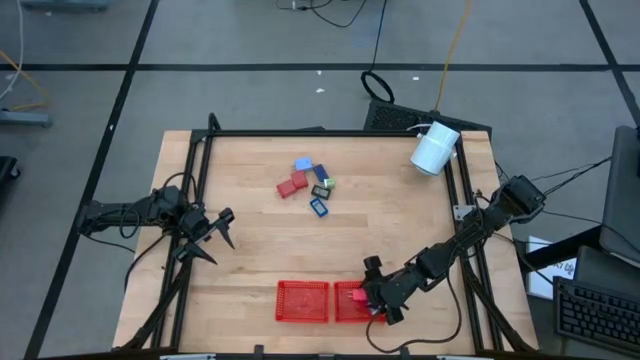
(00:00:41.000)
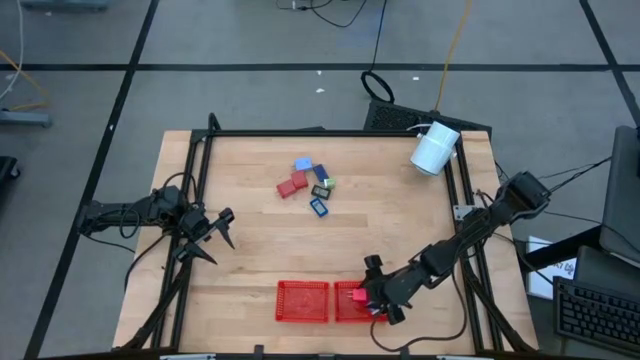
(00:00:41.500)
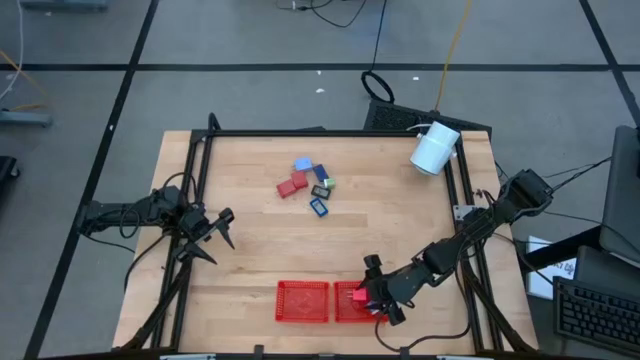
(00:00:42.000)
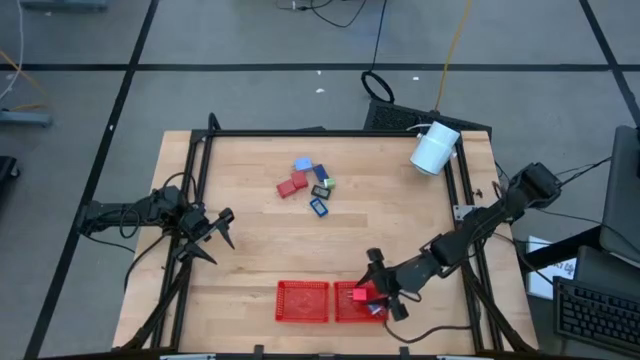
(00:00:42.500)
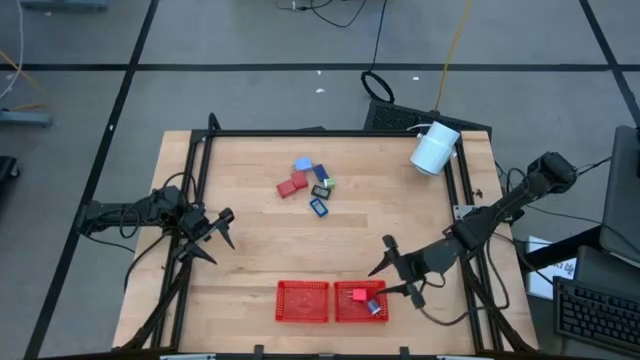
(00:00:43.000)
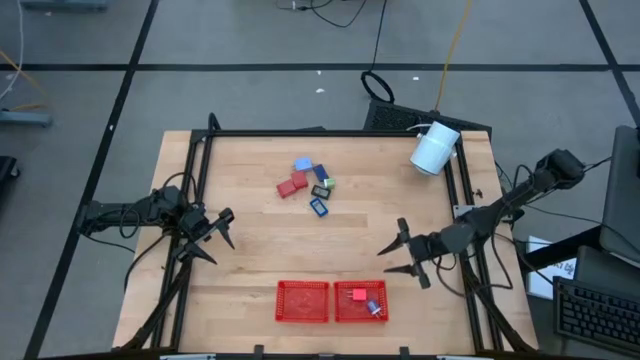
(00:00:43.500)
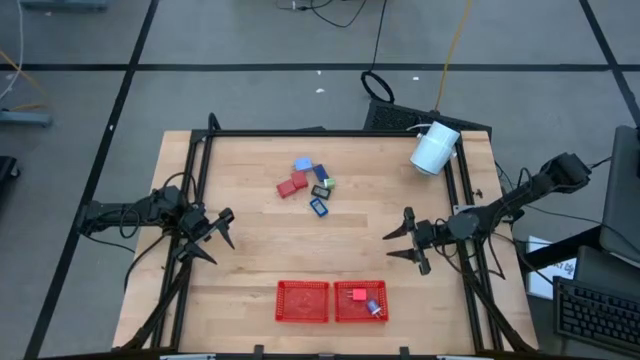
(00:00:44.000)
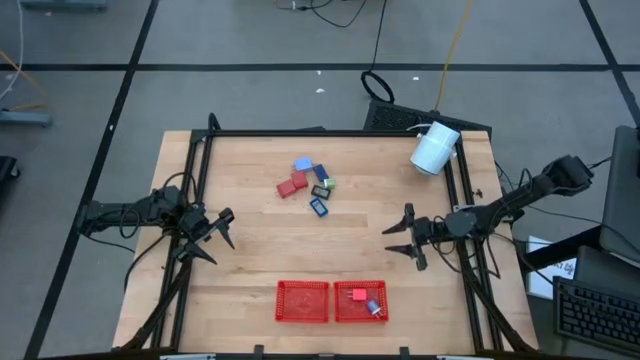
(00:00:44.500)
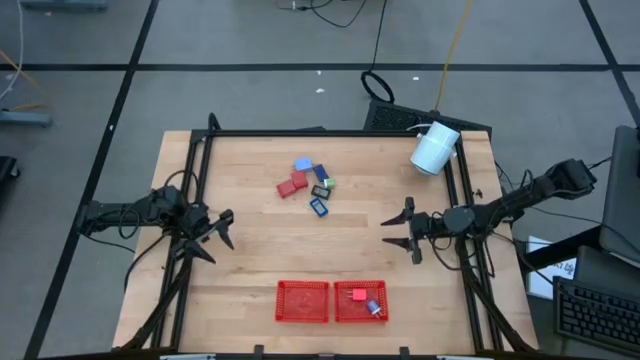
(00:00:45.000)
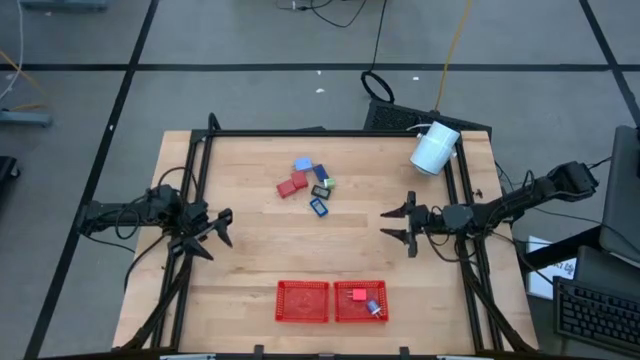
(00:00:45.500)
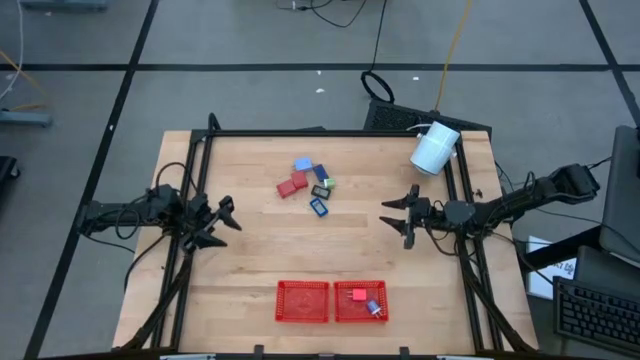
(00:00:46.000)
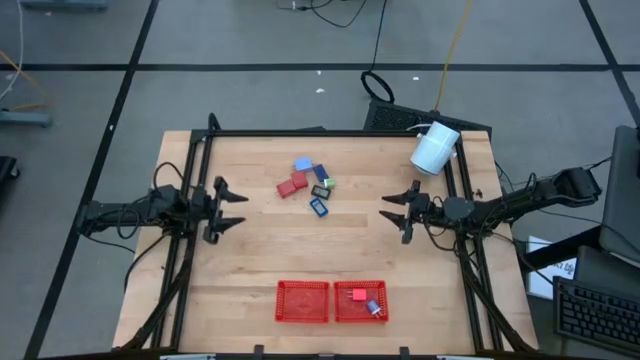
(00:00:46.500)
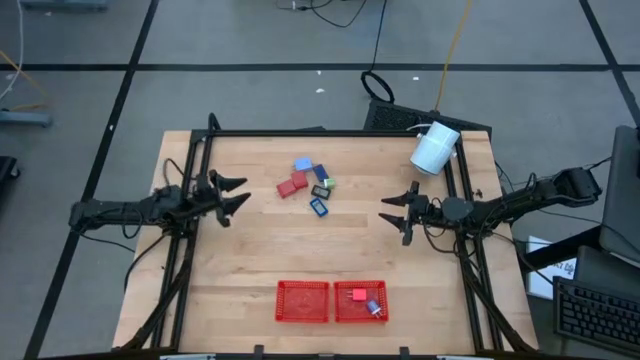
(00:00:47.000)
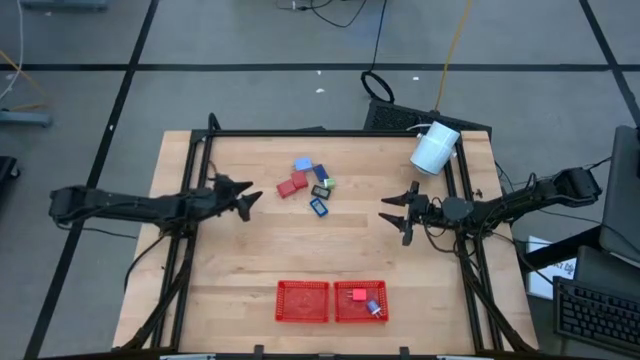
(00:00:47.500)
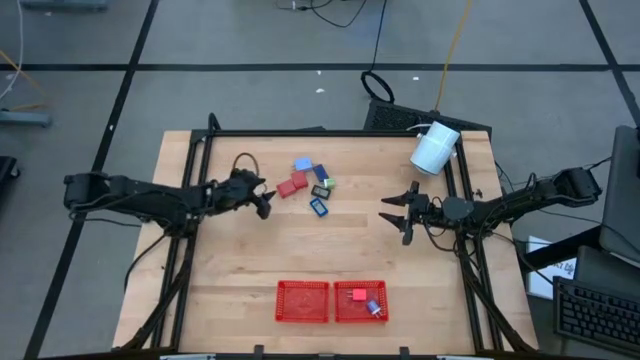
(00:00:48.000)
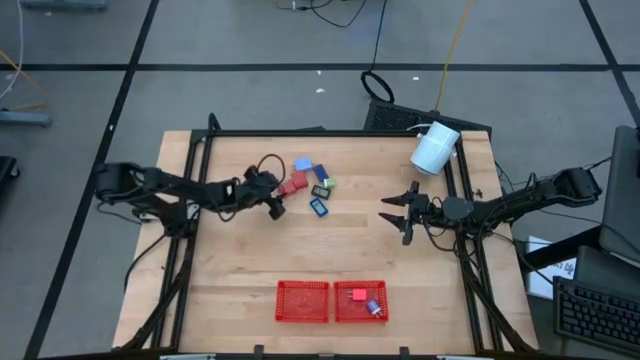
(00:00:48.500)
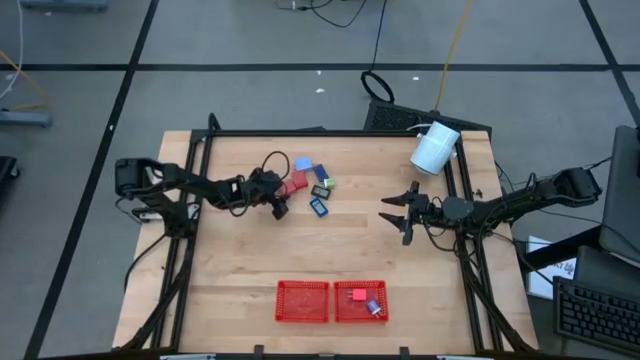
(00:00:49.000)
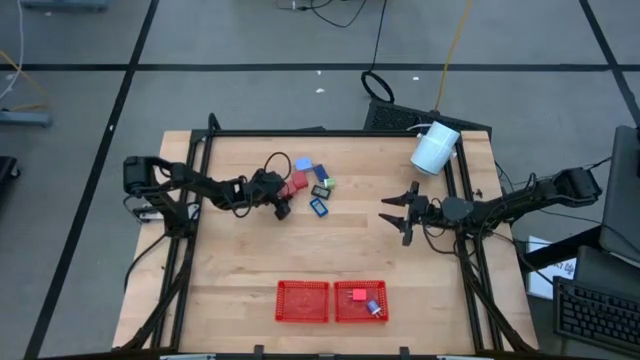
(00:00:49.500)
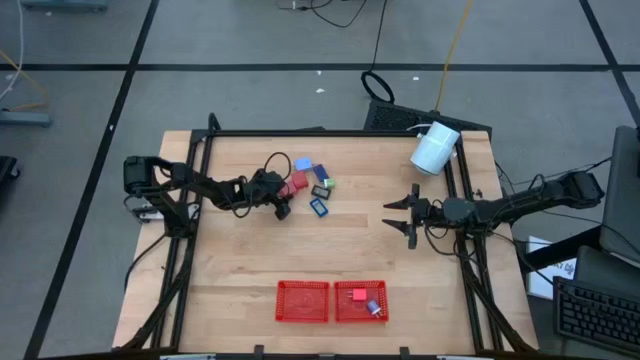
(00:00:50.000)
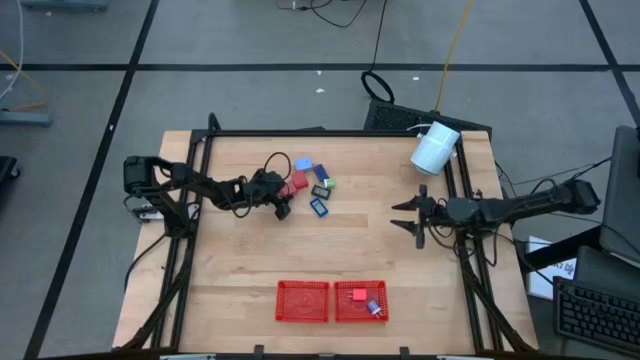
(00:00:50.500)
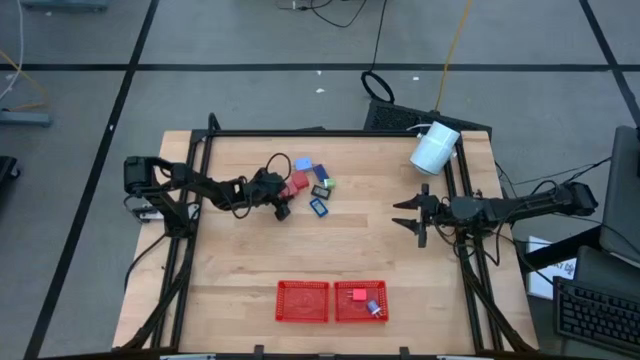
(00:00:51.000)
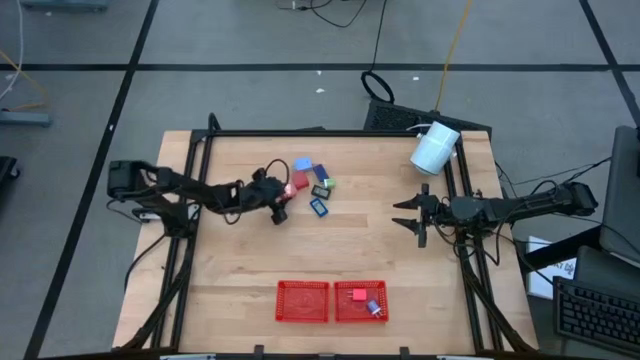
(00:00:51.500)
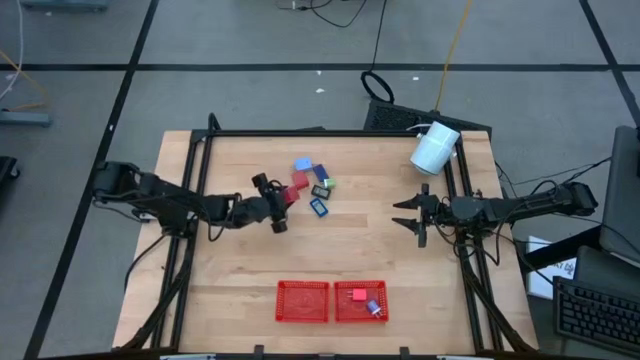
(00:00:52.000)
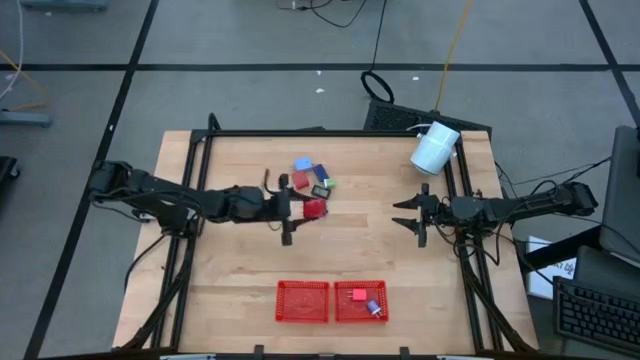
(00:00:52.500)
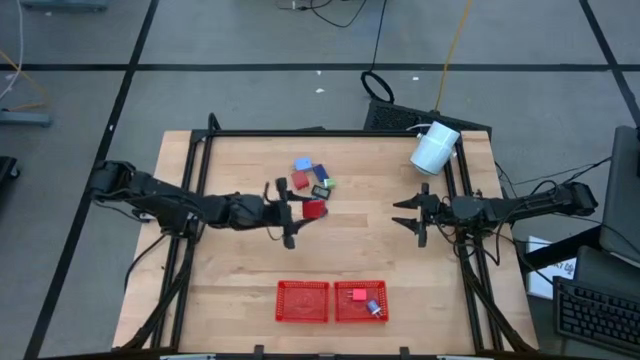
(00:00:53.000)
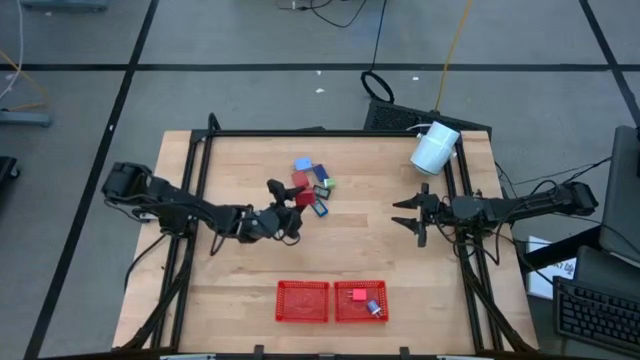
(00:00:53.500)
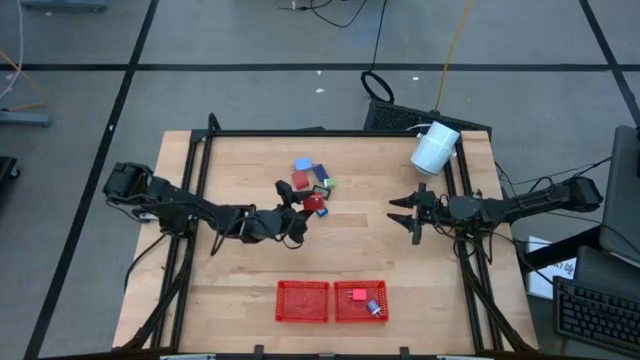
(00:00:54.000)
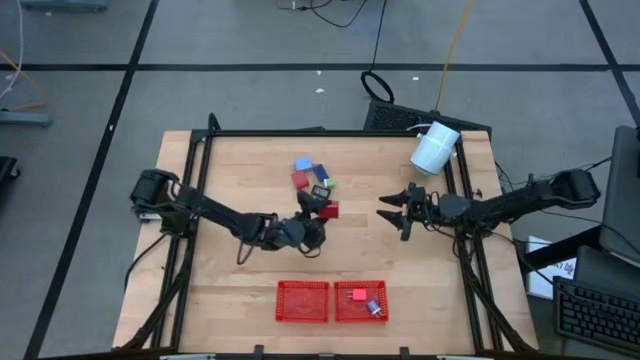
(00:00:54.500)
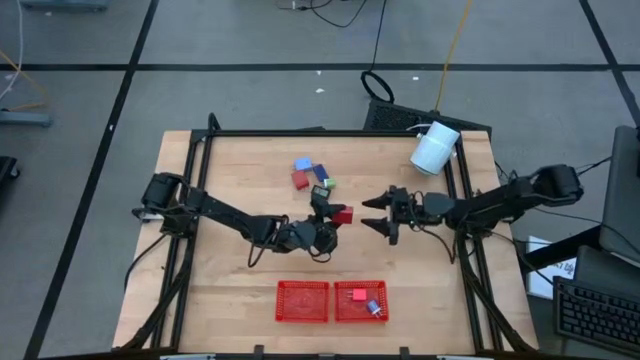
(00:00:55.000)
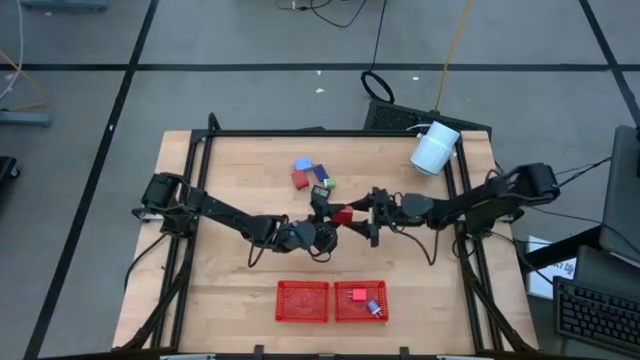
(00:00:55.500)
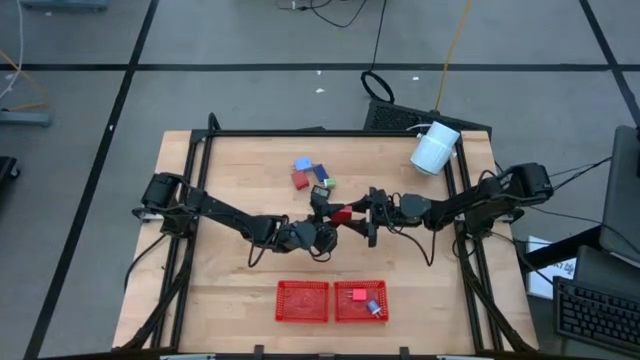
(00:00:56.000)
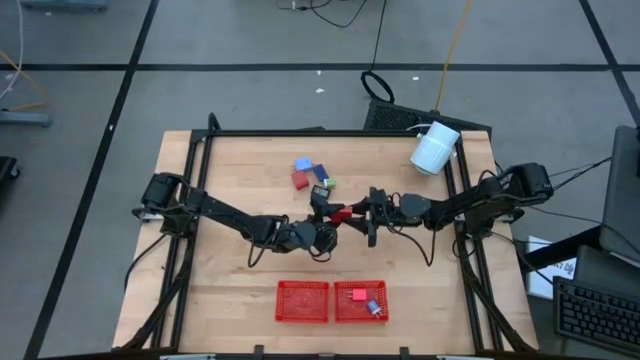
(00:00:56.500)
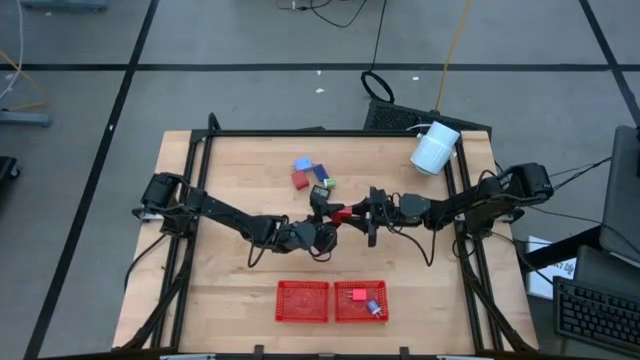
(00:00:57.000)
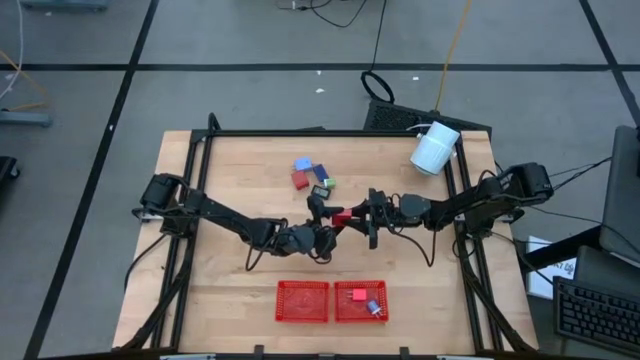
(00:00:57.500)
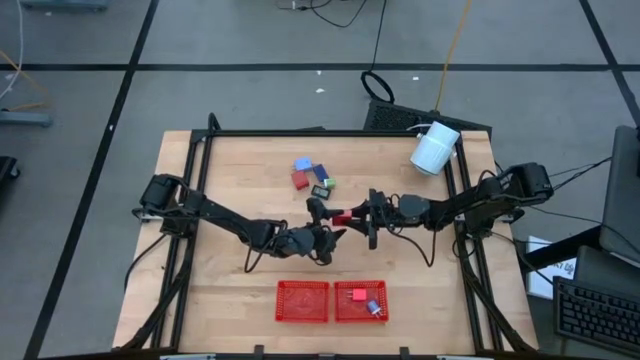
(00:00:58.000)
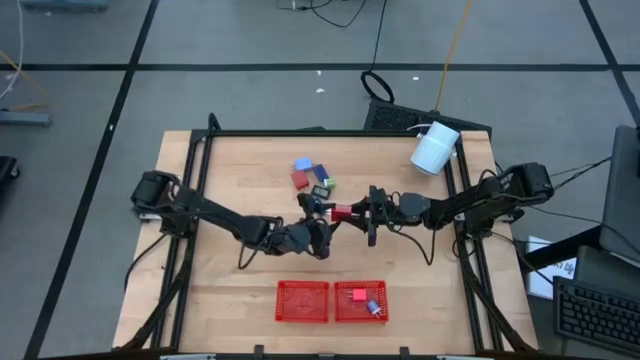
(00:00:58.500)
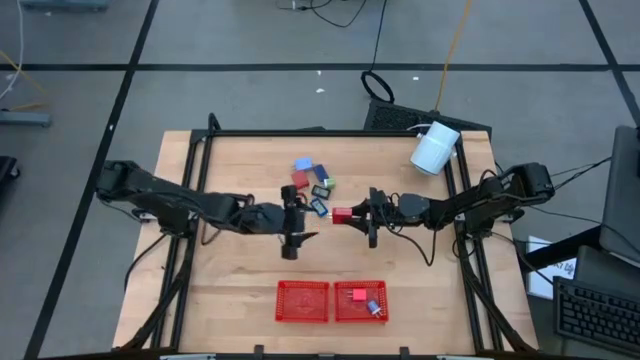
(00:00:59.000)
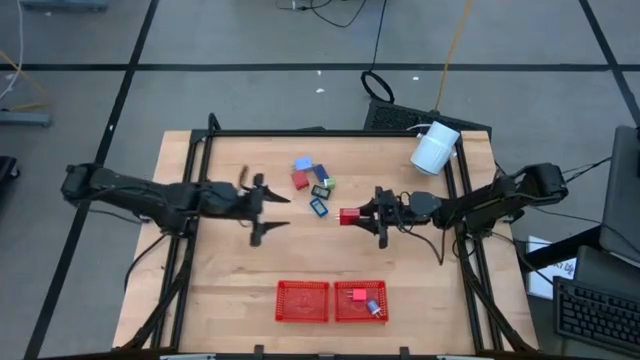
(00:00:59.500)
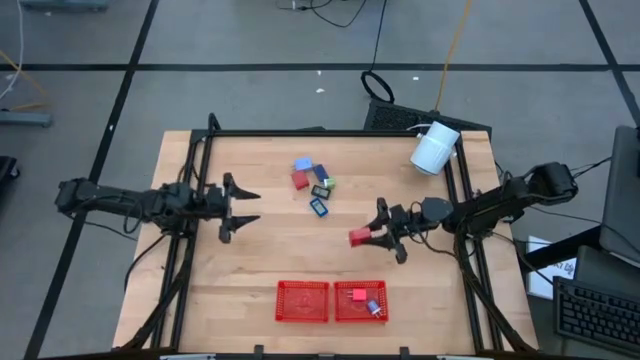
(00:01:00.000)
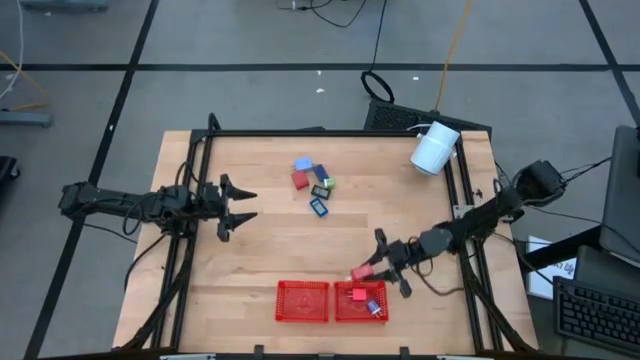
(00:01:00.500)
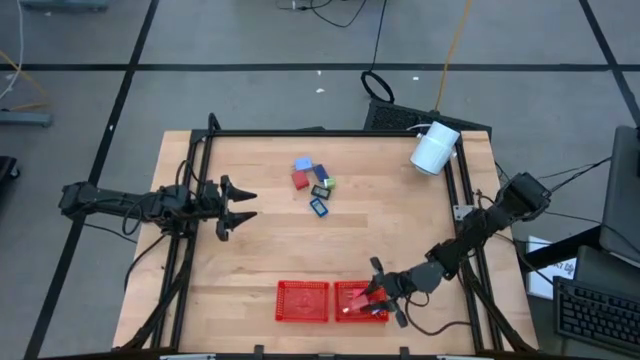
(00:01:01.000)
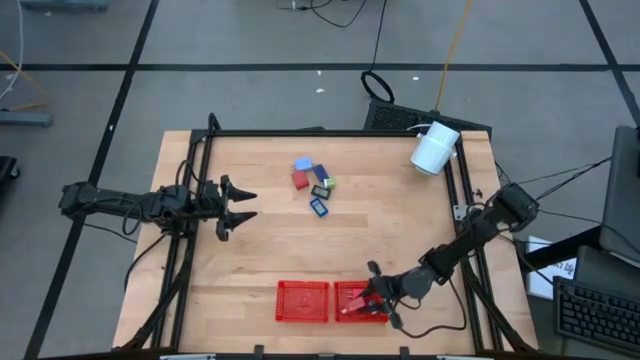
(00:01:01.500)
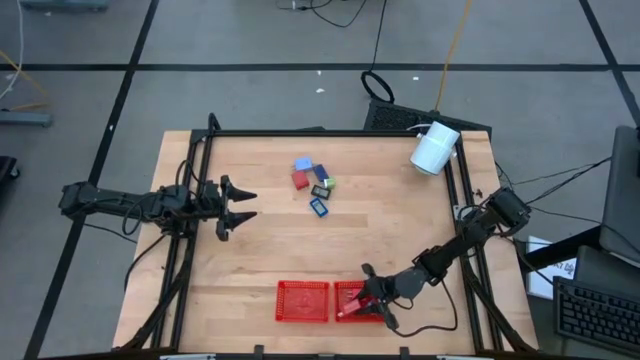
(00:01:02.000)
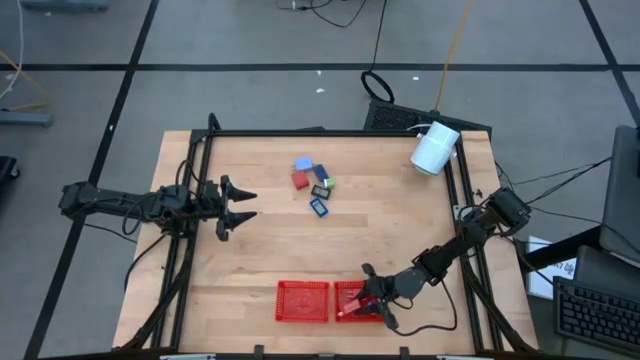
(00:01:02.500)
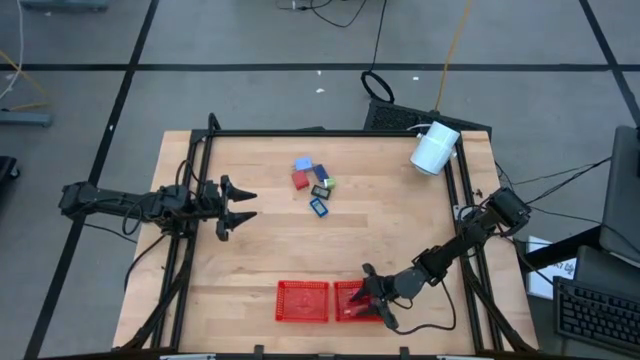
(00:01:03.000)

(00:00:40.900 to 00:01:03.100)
Task: Pick & Place Office items
Put the left red charger adapter into the right red bin
